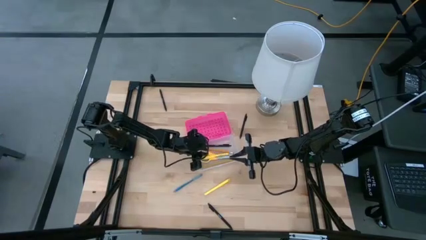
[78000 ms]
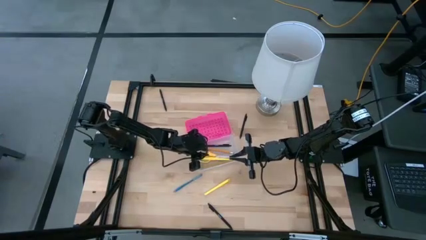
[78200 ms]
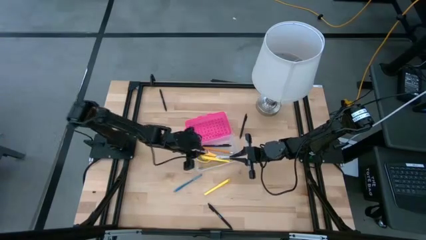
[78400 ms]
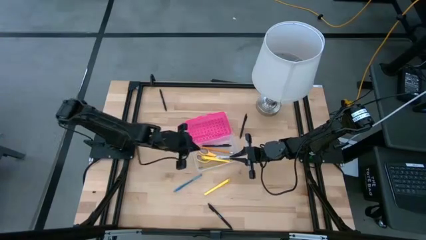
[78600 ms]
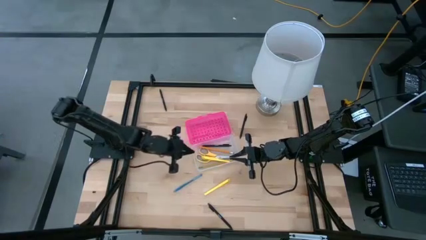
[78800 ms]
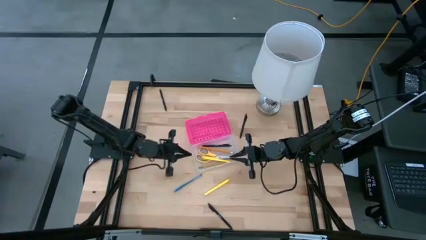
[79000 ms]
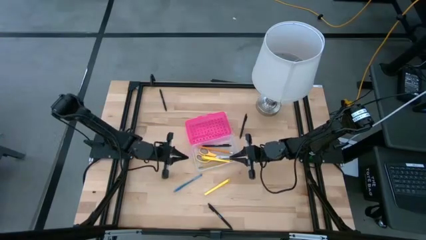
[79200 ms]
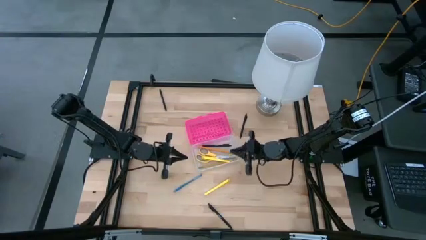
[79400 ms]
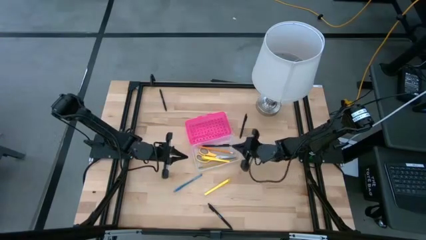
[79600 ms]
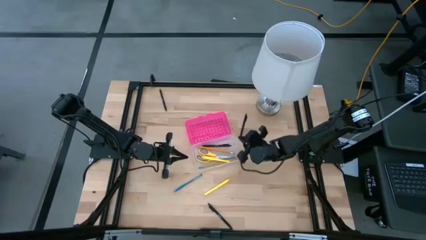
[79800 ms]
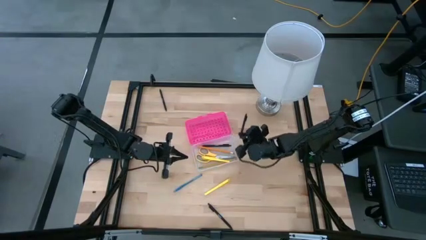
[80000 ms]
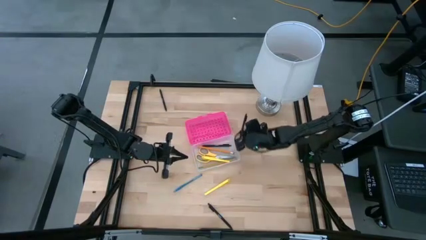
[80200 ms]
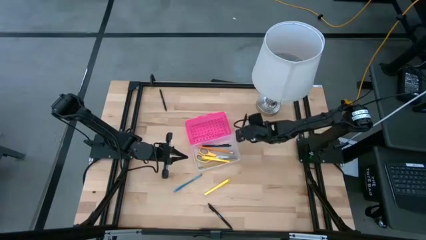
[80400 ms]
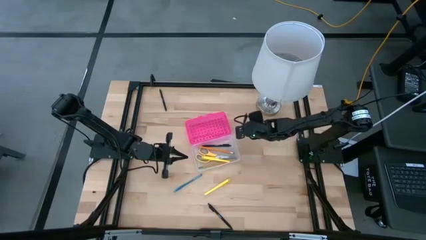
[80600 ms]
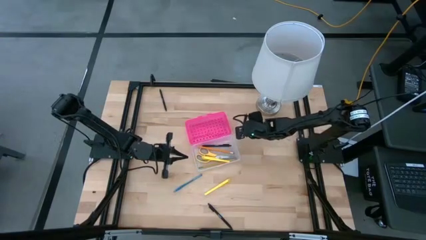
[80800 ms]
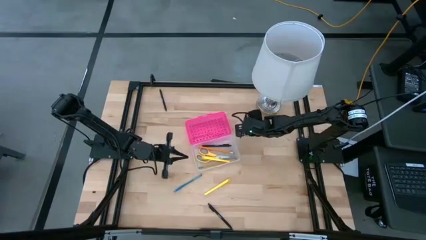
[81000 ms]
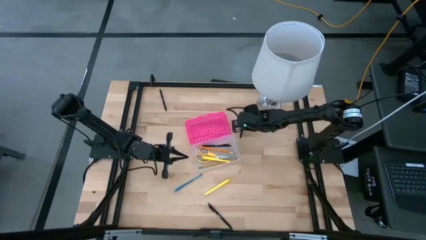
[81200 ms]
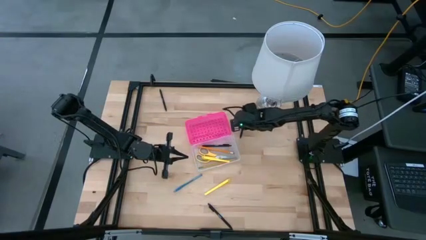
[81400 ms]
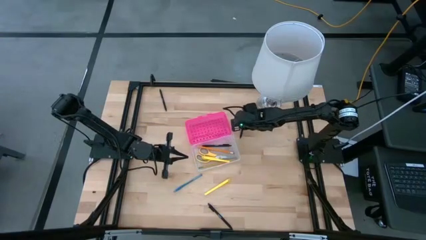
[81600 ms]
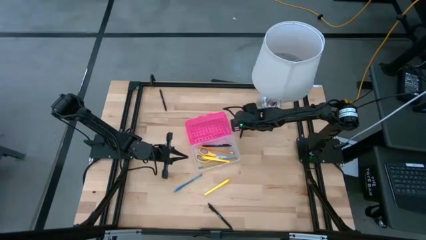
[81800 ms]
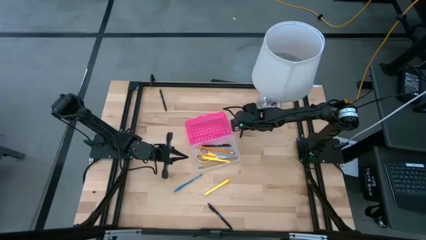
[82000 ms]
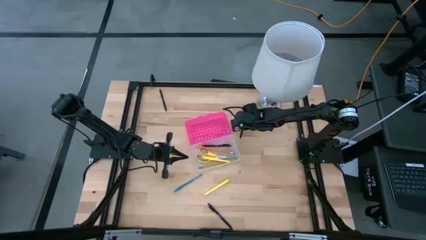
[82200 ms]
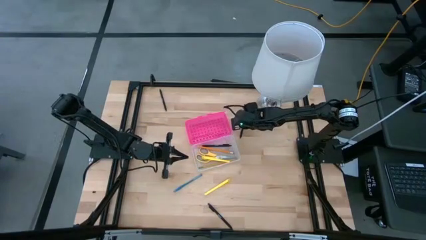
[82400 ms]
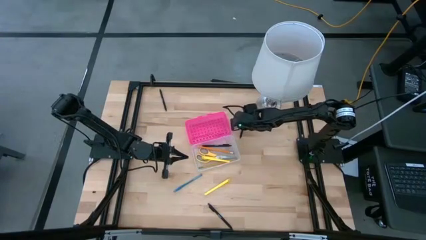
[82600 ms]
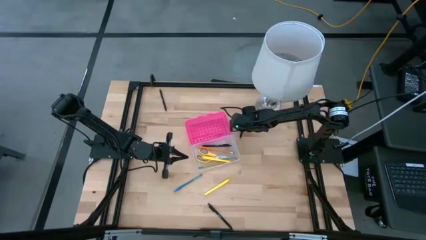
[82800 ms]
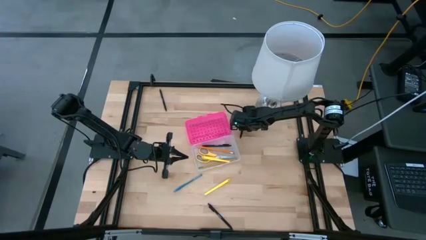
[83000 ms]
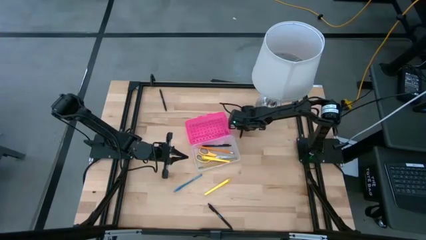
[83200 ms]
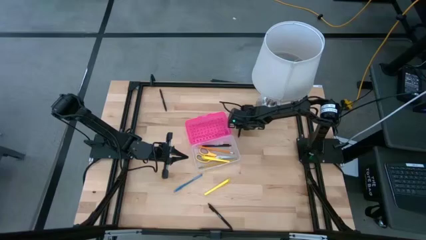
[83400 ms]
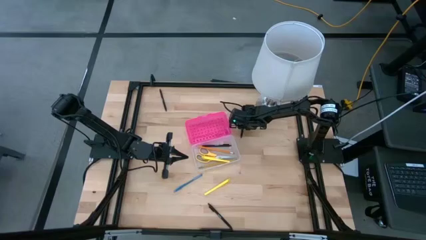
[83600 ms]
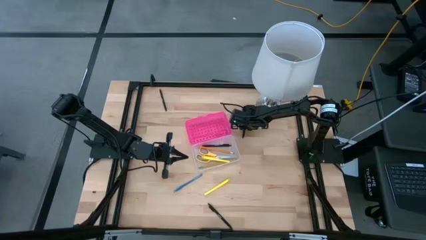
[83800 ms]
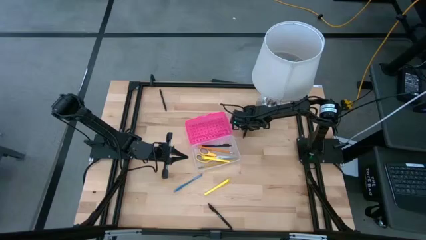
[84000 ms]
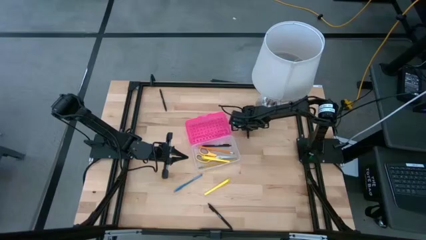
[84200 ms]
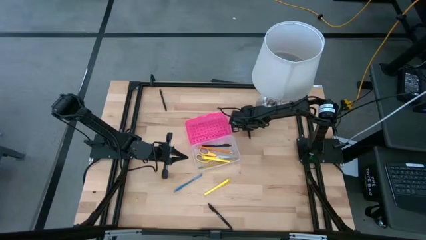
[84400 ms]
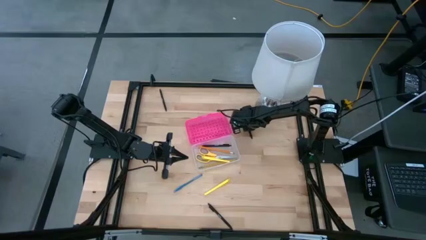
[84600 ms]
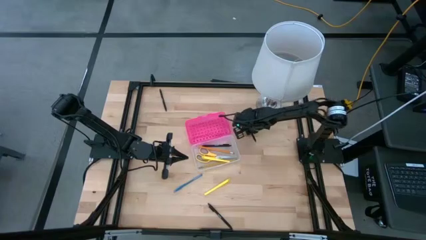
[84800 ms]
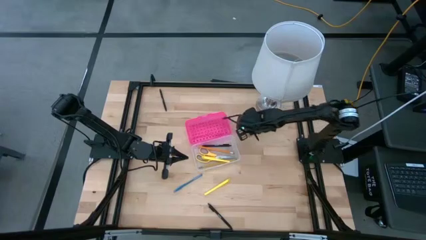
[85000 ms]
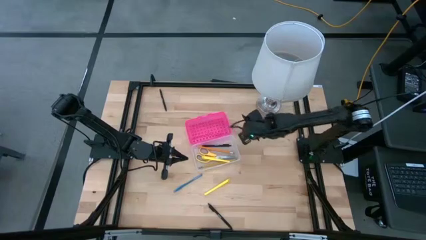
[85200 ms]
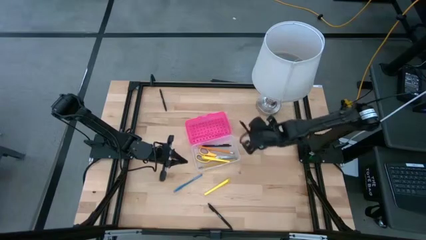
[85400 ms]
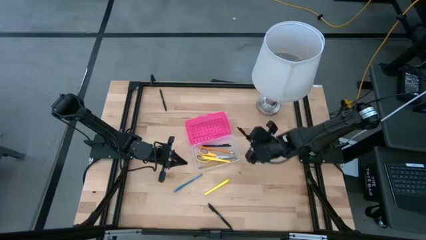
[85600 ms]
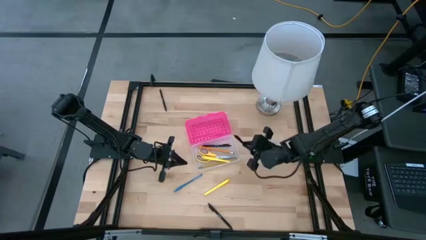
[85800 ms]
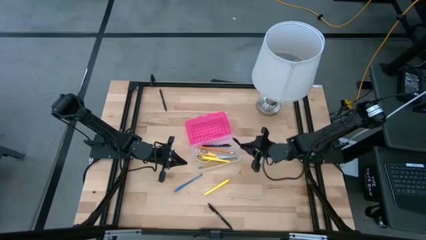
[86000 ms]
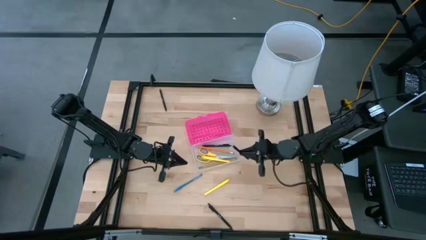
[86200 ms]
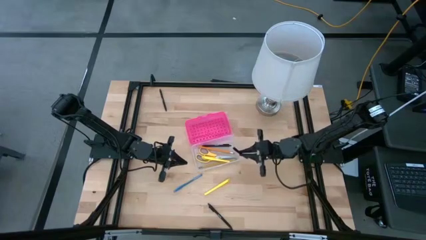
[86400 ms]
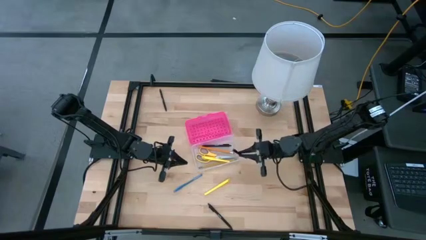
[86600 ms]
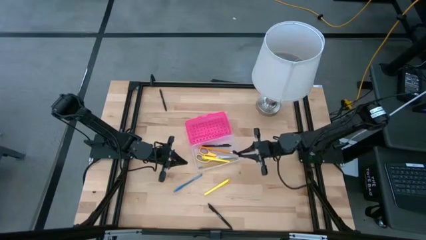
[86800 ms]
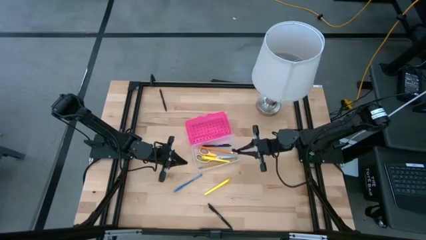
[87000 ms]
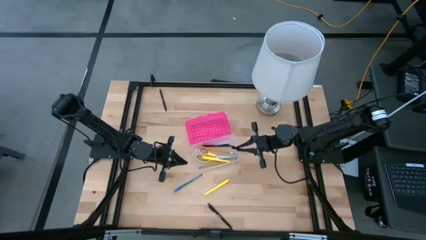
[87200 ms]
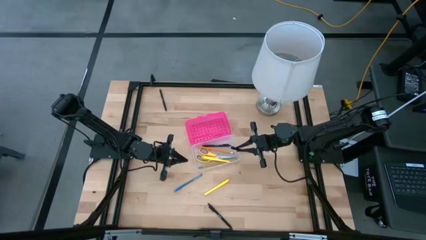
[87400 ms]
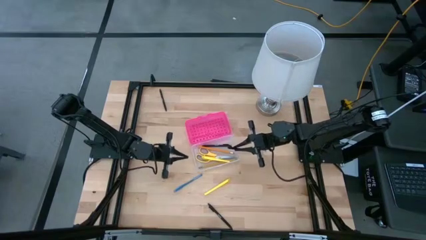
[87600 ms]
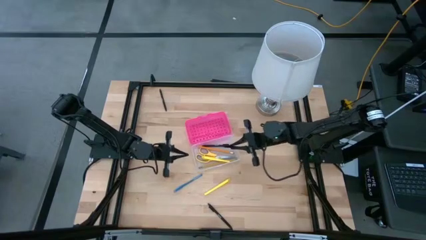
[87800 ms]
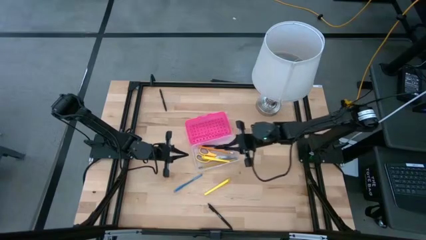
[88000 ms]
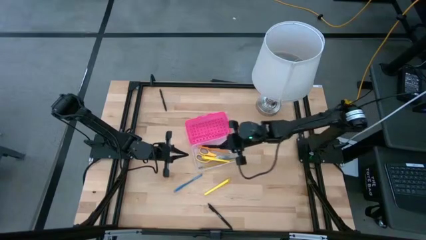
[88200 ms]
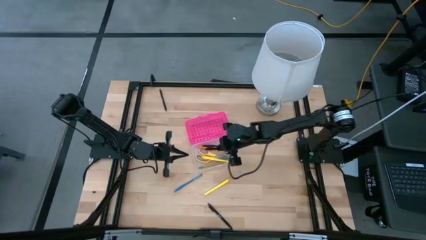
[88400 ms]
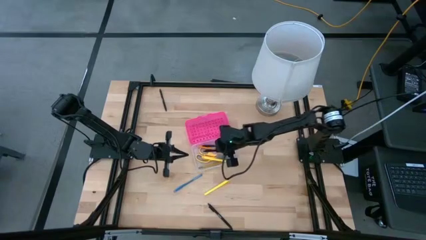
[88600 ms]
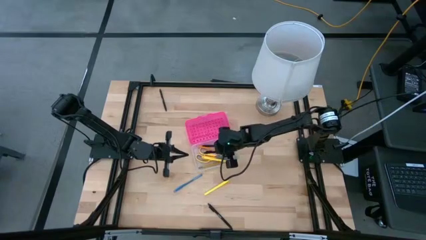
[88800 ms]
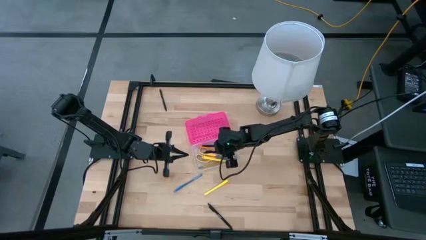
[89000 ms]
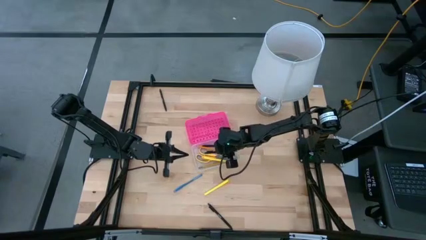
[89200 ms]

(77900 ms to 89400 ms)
Task: Pick & place school supplies into a supply box
Put the black pen into the pink supply box

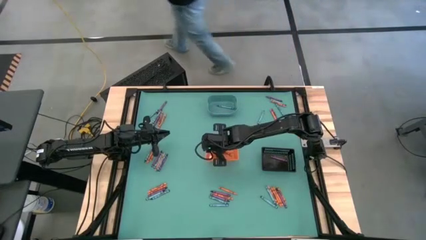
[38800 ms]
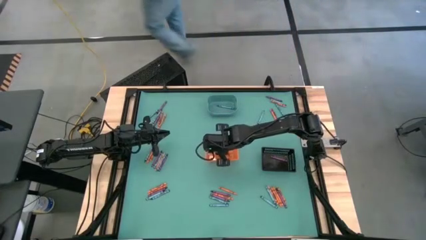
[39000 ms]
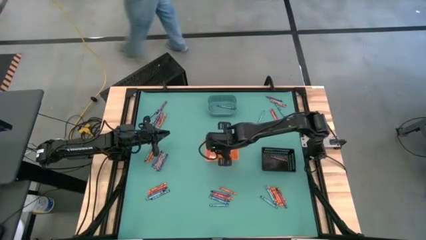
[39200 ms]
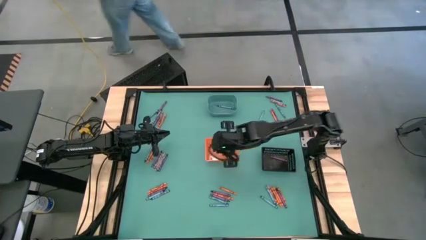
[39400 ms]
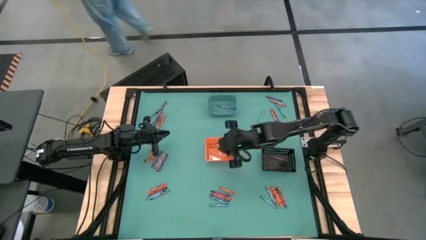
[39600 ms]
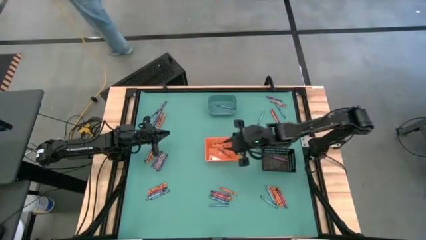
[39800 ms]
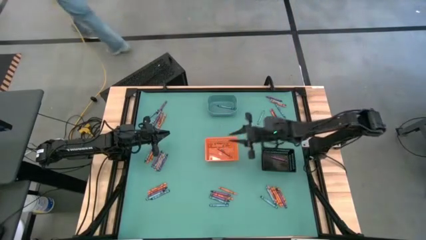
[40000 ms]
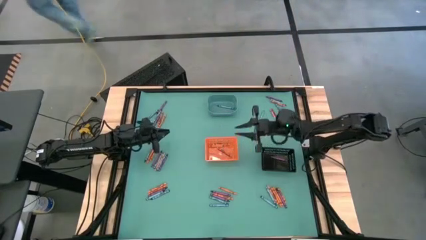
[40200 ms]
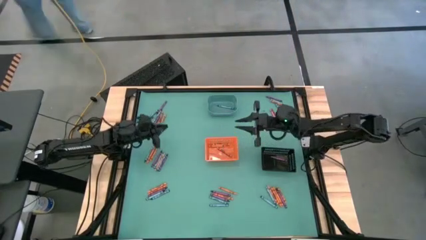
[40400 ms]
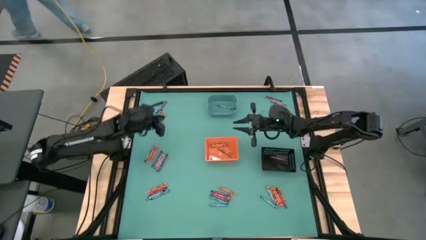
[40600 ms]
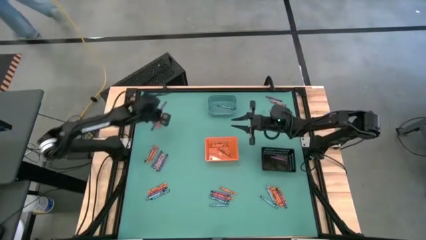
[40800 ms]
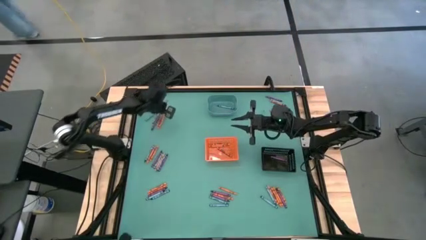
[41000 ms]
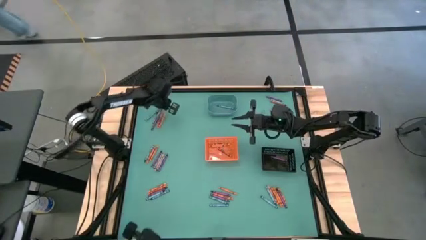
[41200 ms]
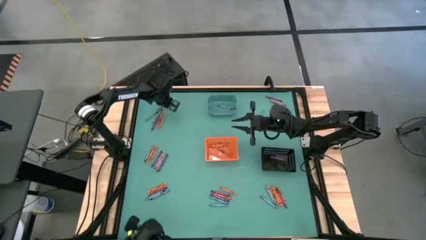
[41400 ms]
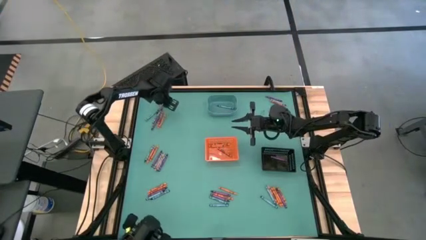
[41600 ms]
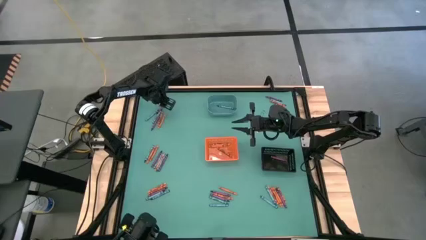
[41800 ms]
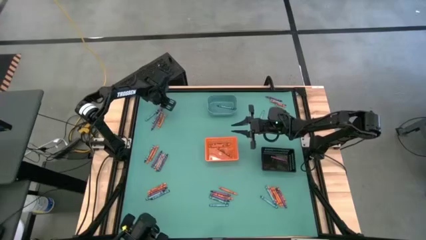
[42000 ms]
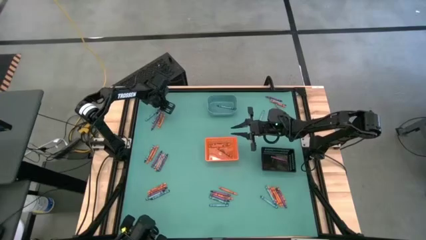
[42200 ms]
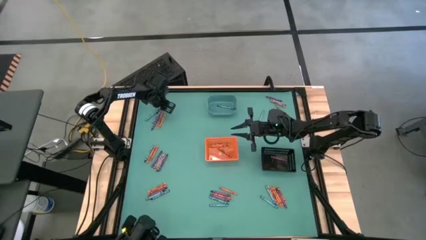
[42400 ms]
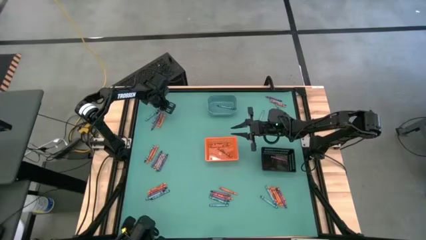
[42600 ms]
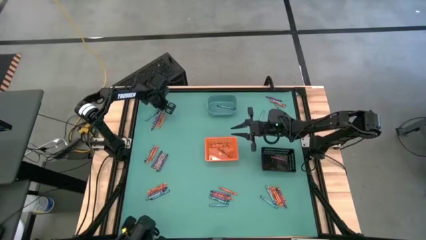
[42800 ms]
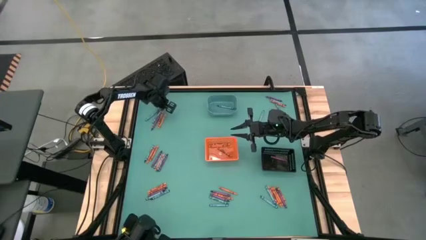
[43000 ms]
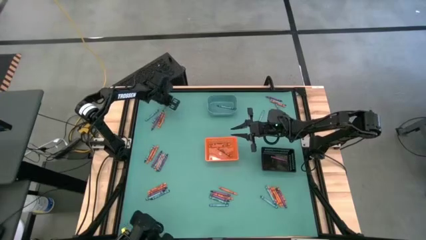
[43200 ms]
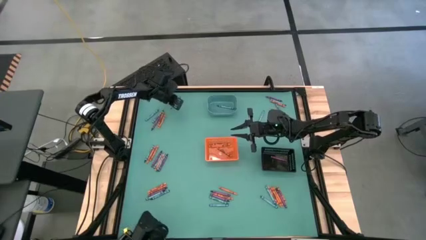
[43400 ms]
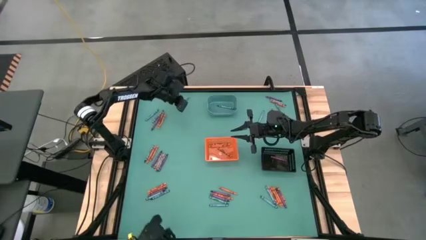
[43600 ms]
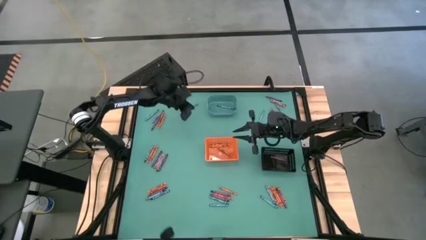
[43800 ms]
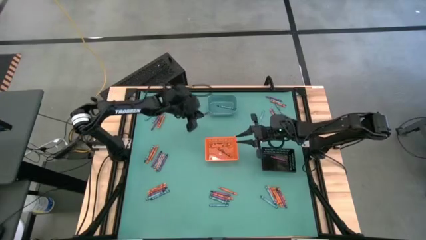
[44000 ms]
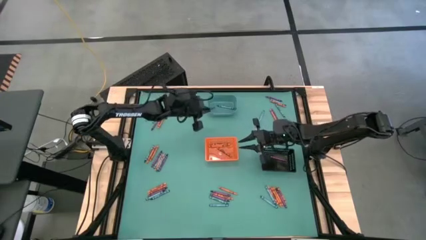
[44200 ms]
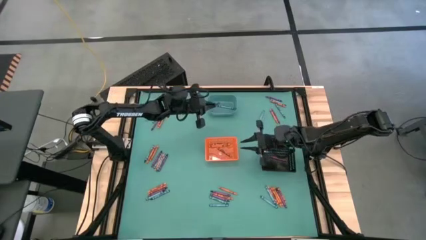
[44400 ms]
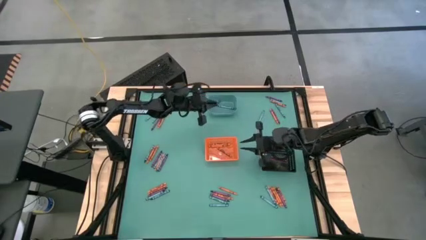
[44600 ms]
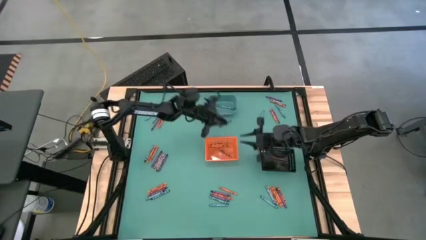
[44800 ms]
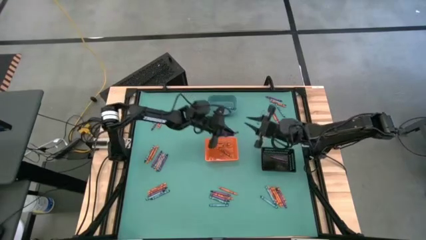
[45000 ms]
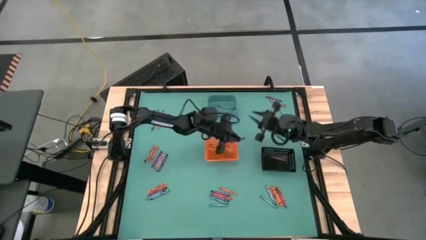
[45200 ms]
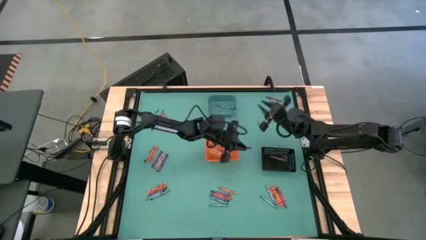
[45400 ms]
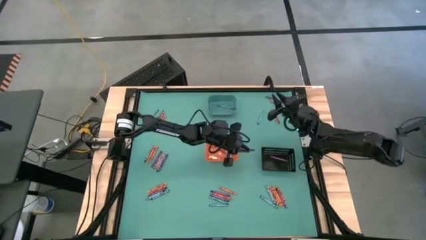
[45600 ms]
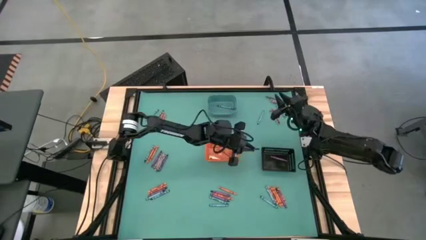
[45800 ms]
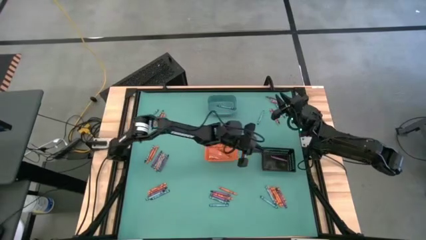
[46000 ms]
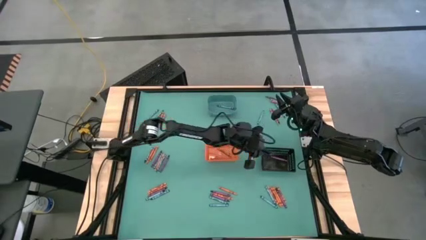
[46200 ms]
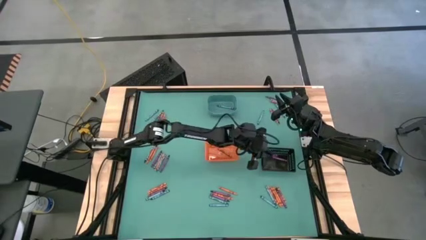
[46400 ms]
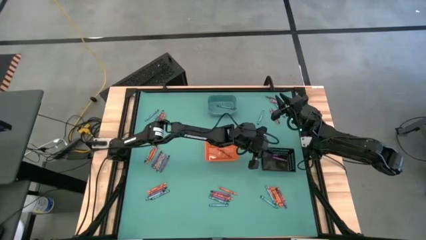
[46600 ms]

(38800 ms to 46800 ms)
Task: Sort crayons
Put the violet crayon into the black bin
